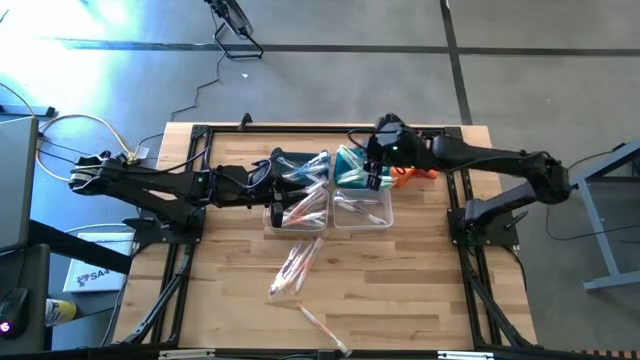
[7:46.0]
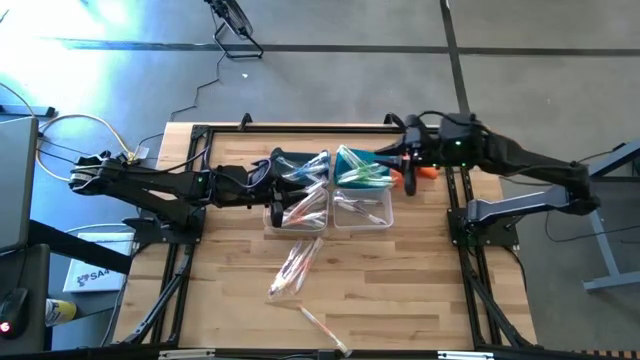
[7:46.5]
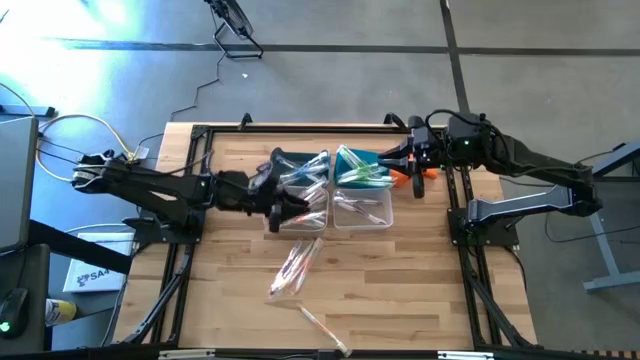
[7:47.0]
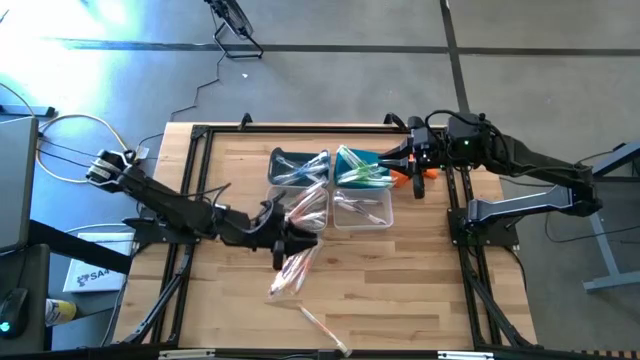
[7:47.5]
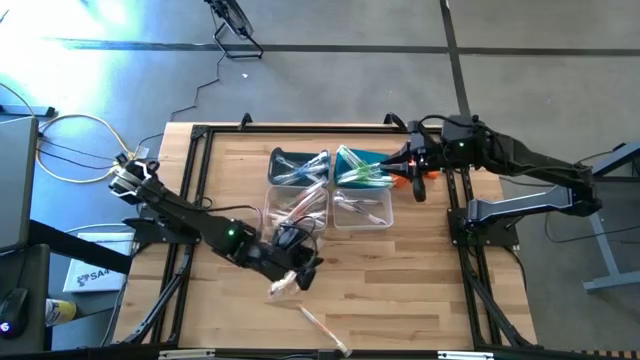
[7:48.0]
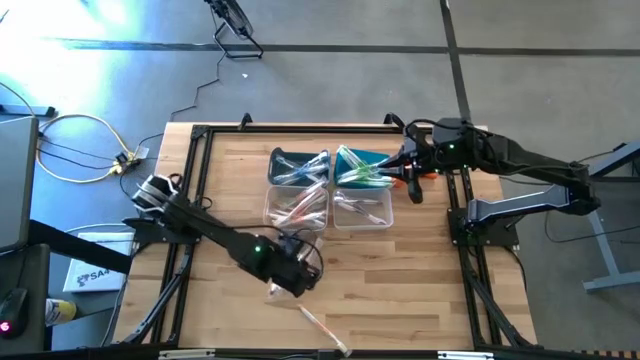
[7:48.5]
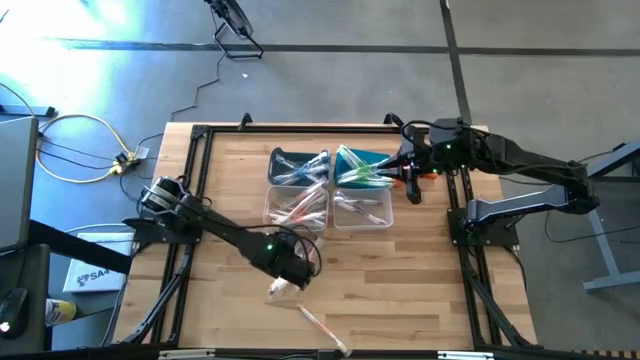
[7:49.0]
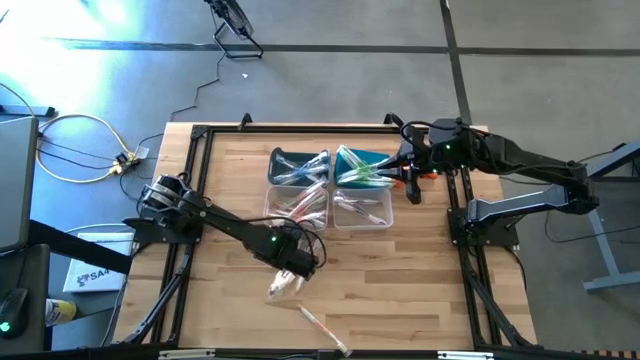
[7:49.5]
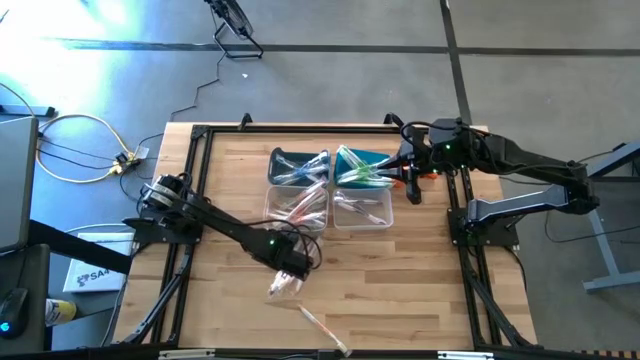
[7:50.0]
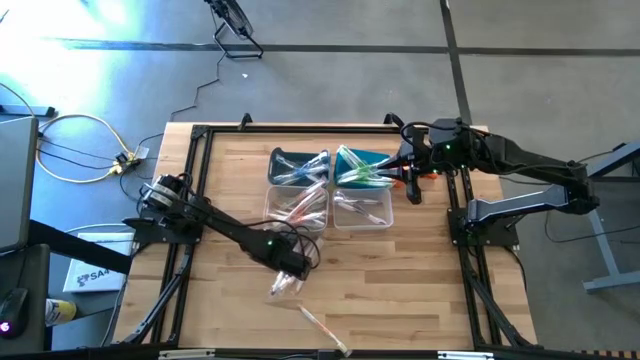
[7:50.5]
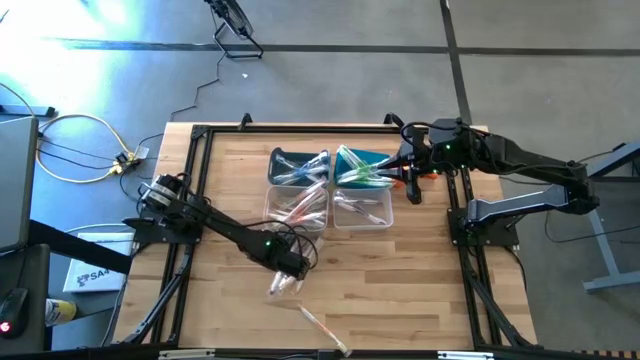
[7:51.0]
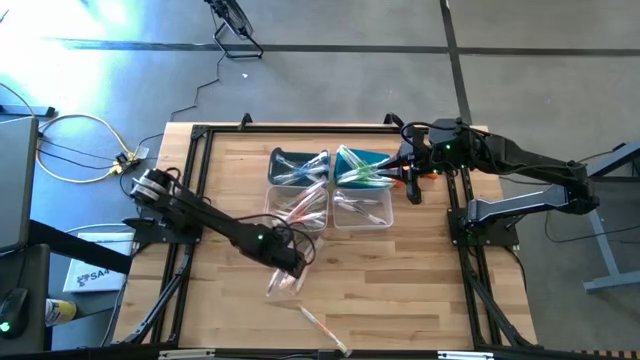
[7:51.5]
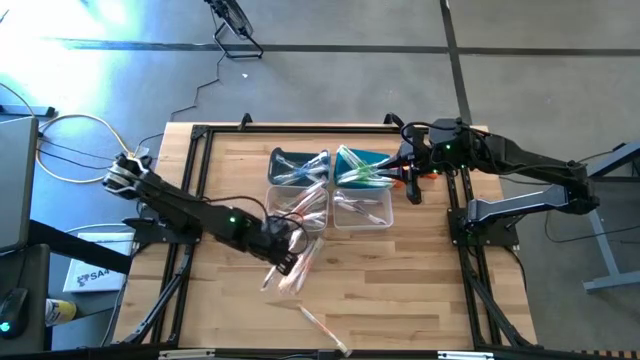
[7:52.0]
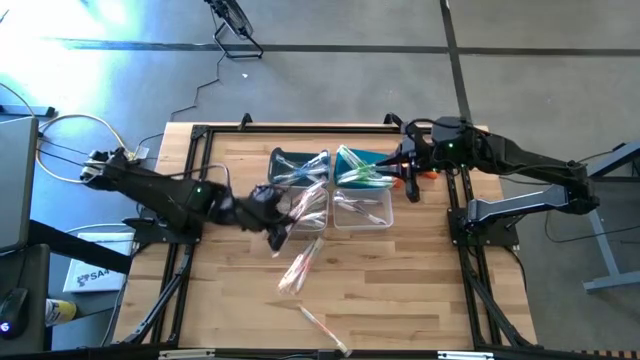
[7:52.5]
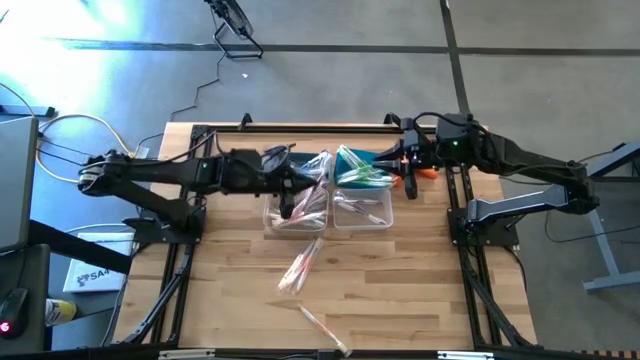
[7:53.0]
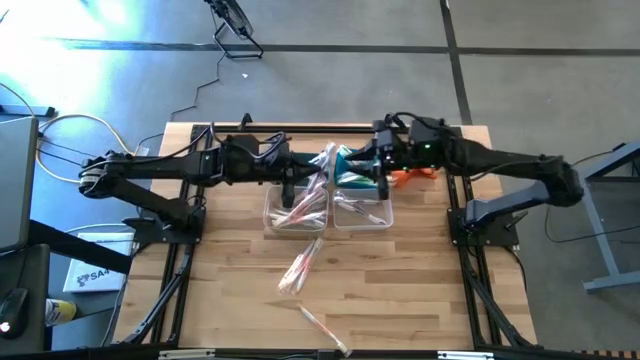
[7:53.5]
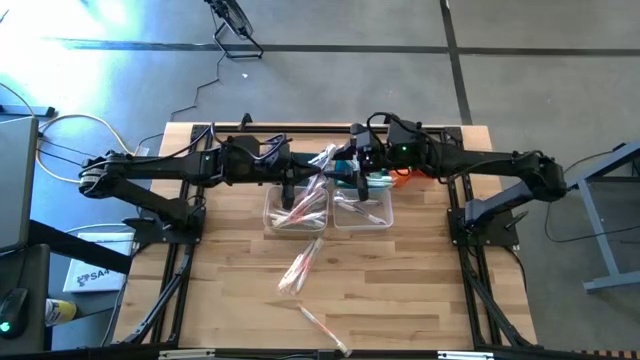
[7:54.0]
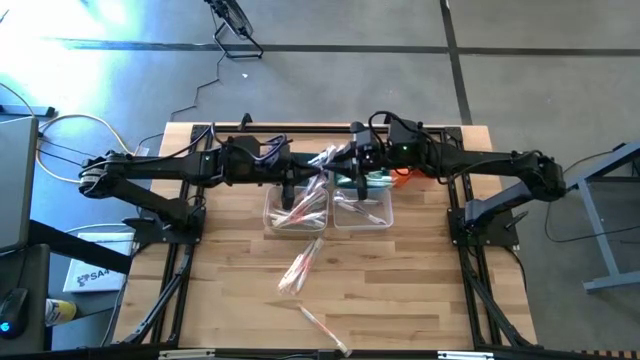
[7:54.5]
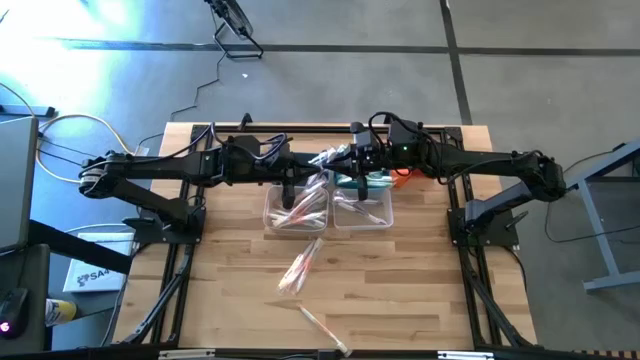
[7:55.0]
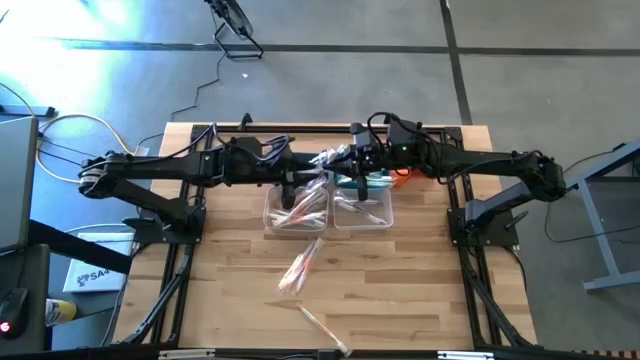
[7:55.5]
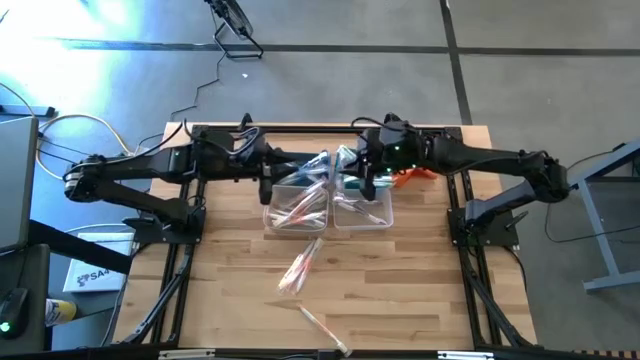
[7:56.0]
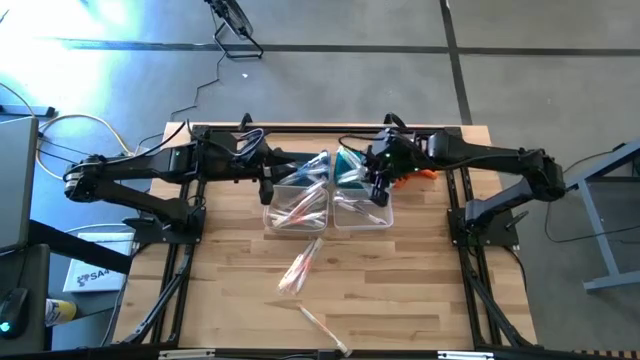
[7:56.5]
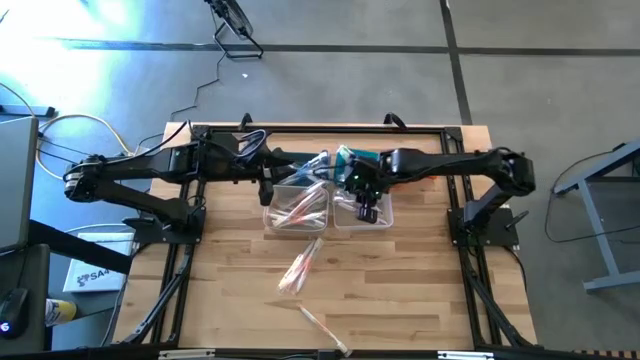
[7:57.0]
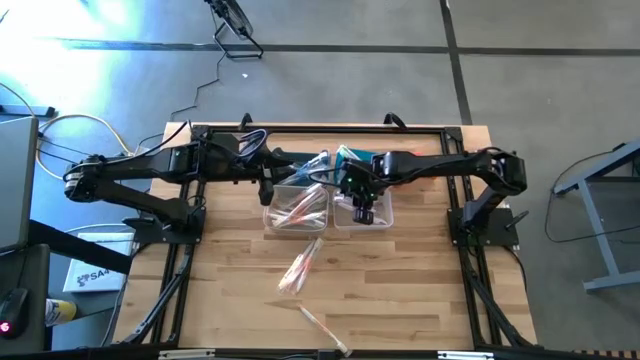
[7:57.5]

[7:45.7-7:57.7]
Task: Pick & Place Toothbrushes
Put the purple toothbrush into the transparent bin

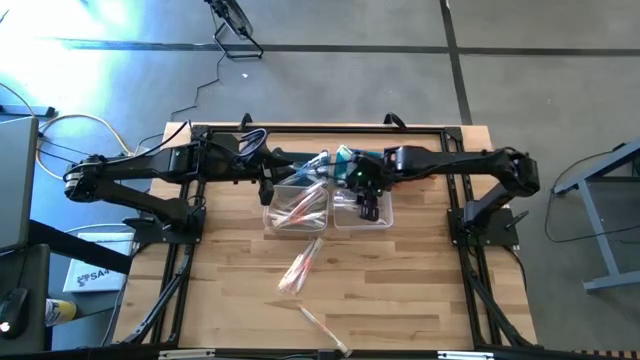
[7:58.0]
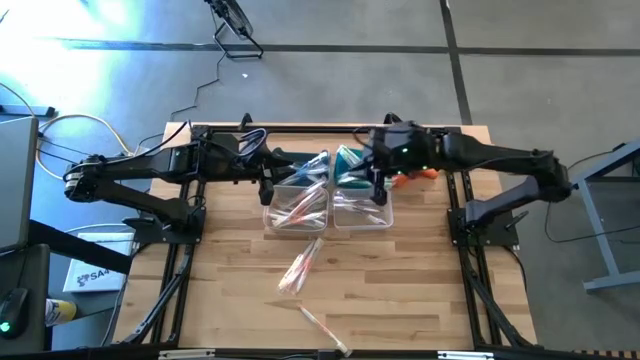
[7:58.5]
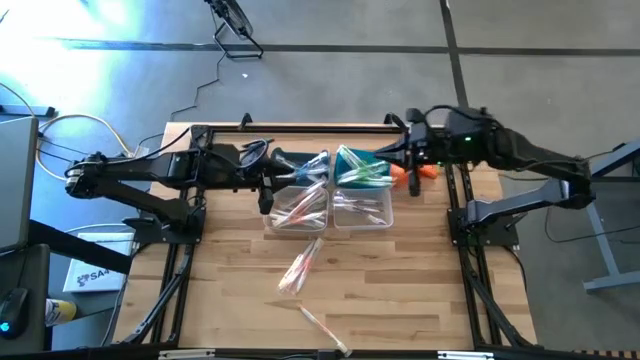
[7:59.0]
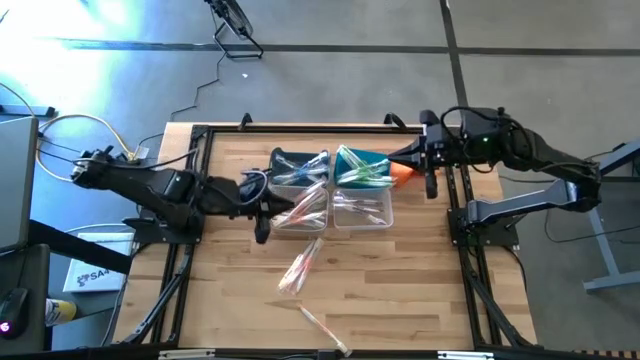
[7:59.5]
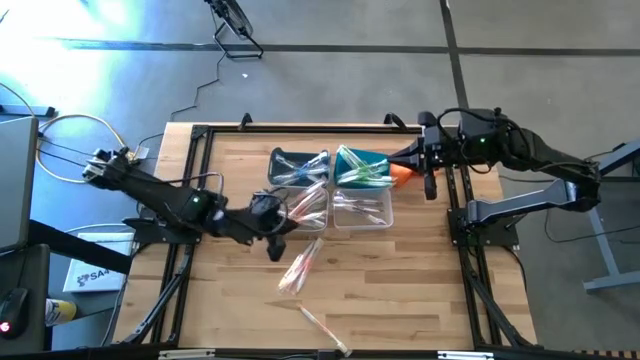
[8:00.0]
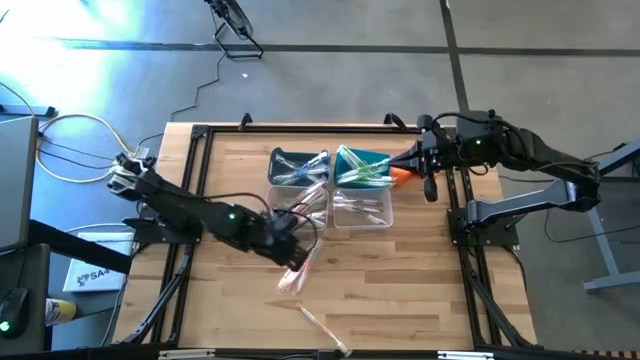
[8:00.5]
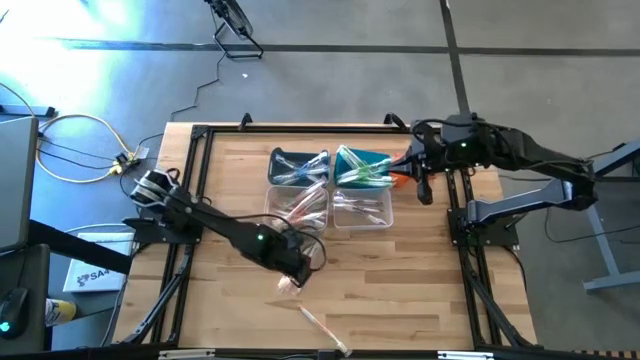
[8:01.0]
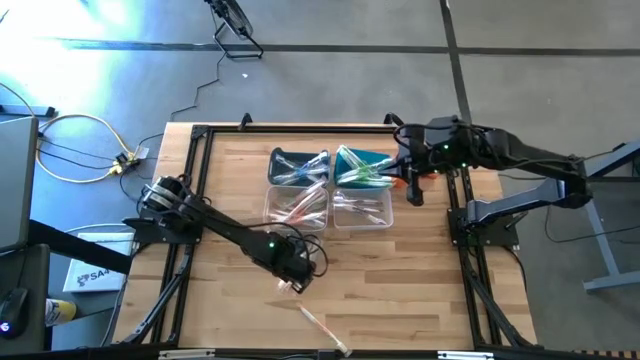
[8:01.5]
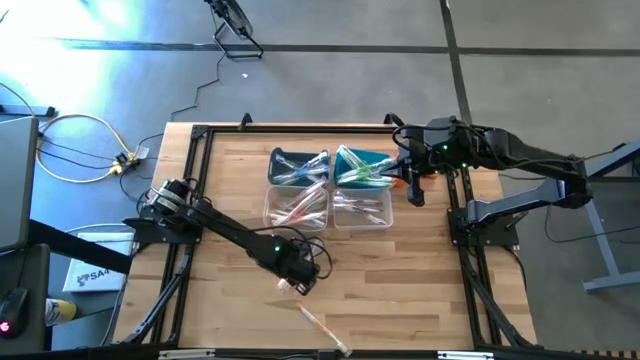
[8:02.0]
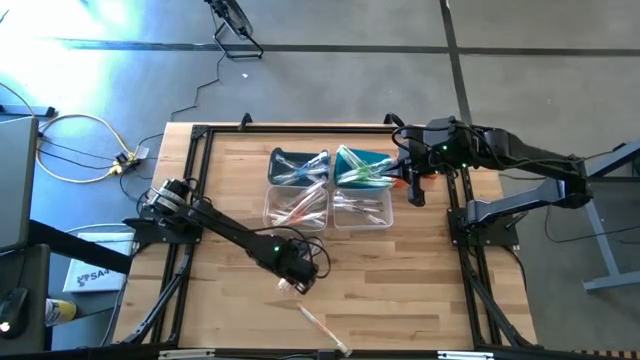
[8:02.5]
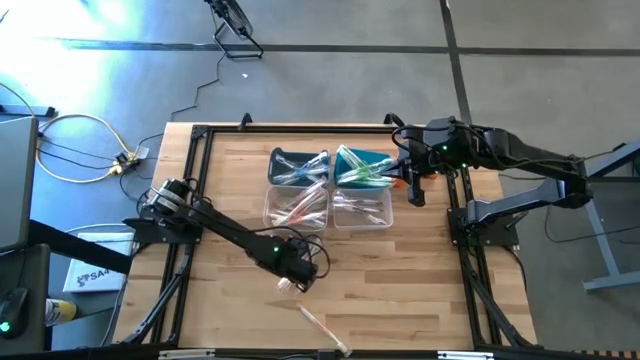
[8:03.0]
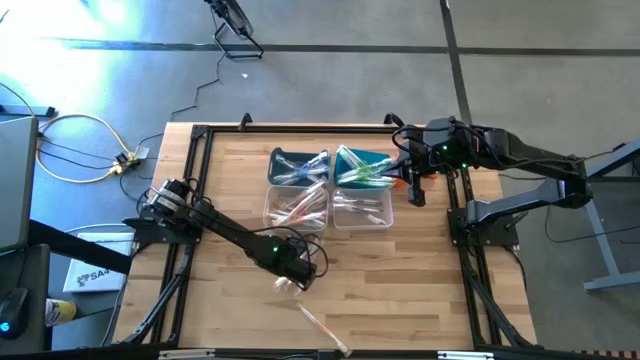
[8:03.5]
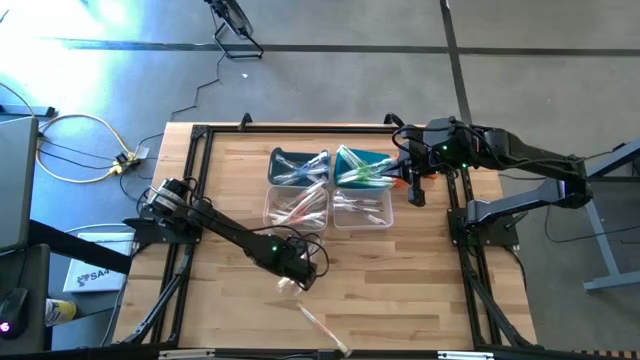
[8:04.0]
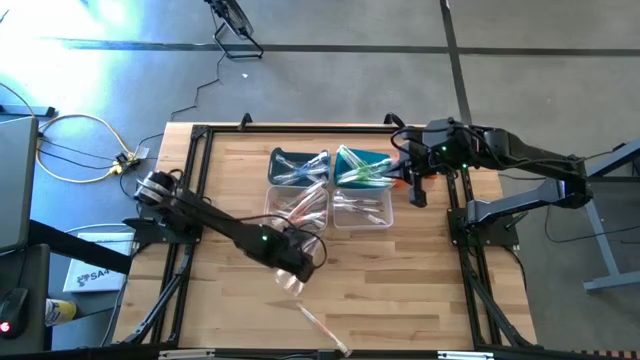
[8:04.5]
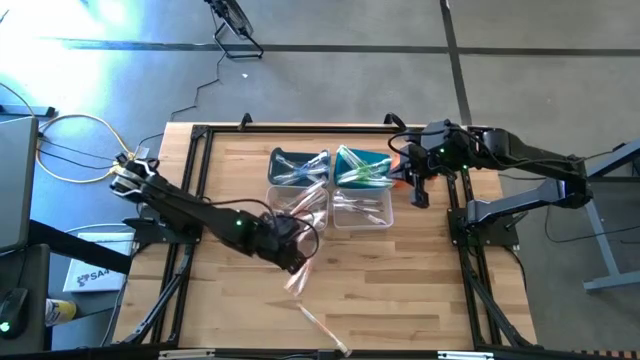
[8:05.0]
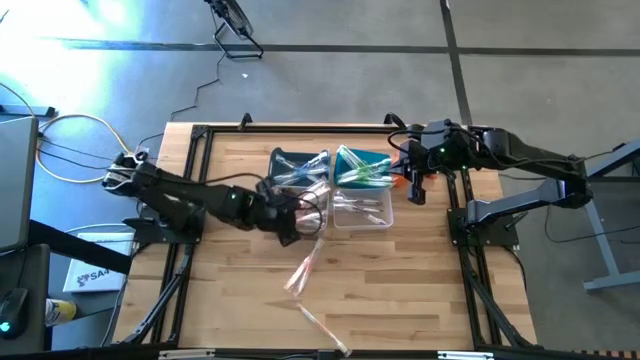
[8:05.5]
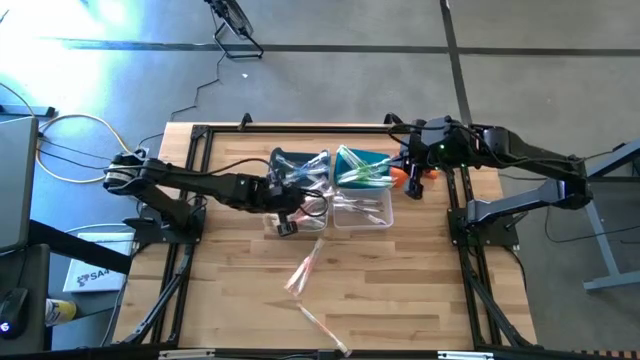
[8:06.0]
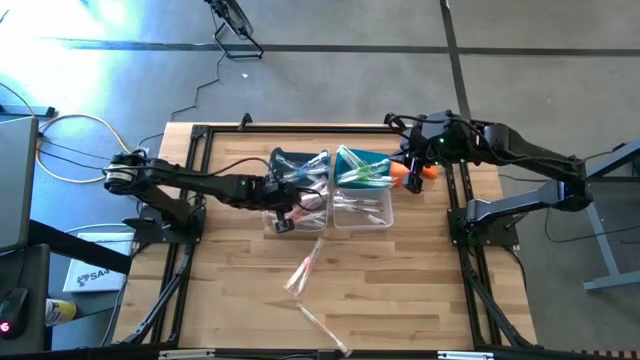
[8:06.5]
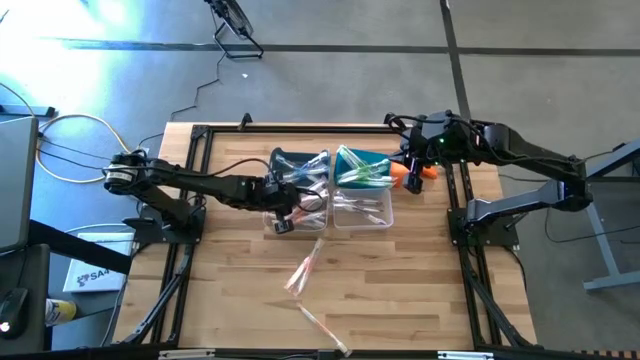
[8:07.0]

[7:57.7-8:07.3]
Put the orange toothbrush into the gray bin
